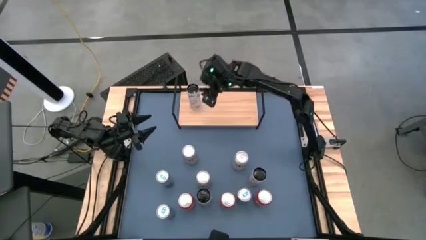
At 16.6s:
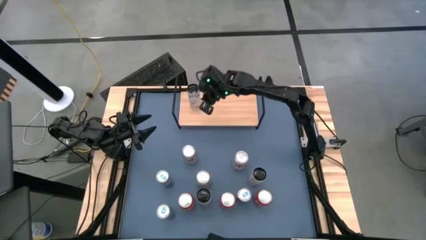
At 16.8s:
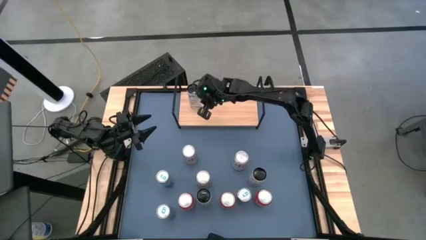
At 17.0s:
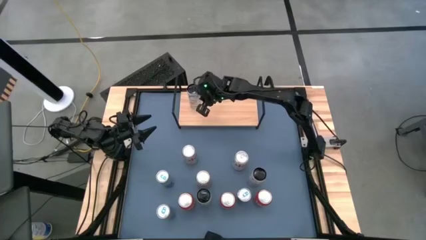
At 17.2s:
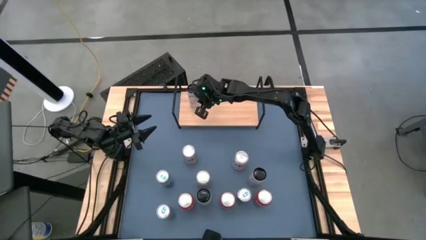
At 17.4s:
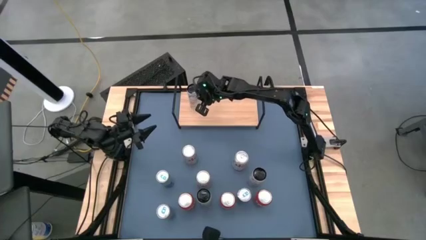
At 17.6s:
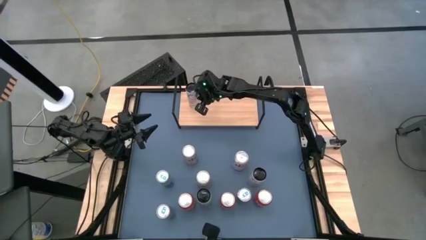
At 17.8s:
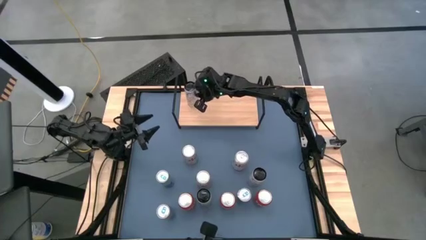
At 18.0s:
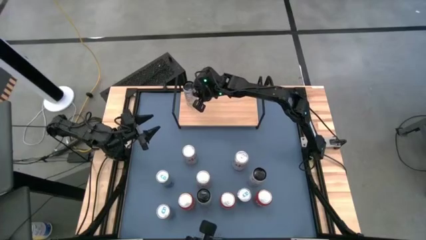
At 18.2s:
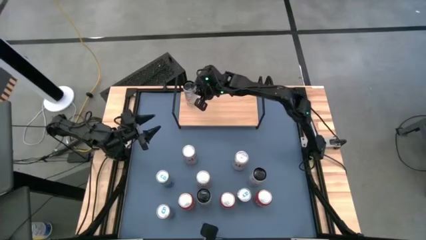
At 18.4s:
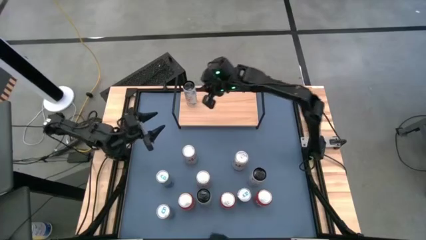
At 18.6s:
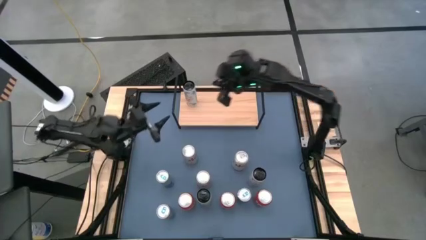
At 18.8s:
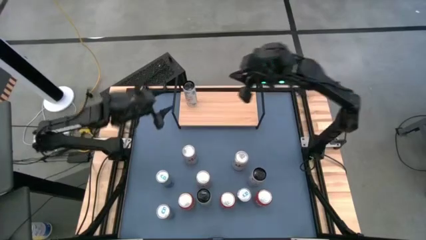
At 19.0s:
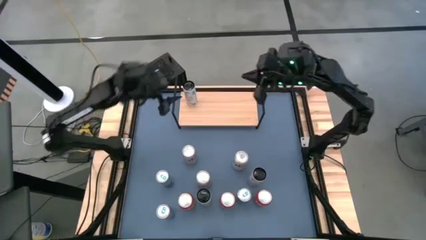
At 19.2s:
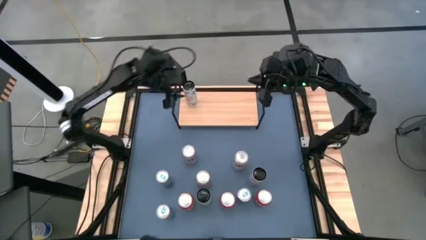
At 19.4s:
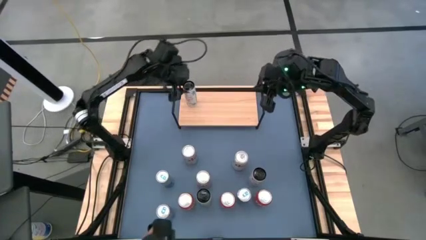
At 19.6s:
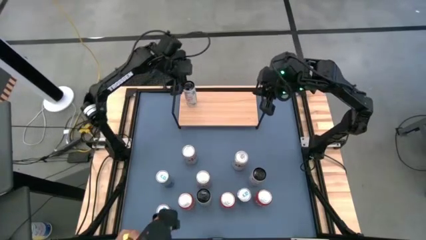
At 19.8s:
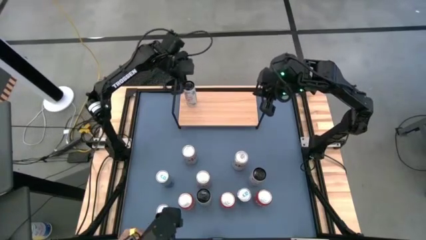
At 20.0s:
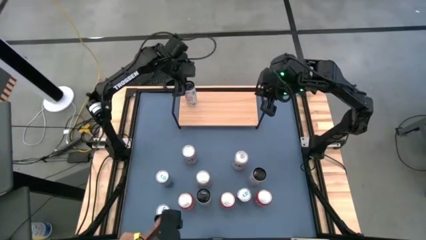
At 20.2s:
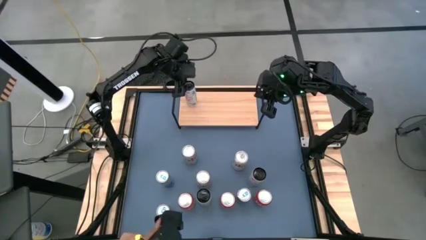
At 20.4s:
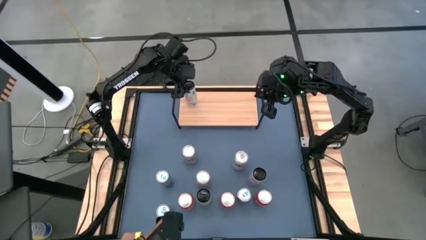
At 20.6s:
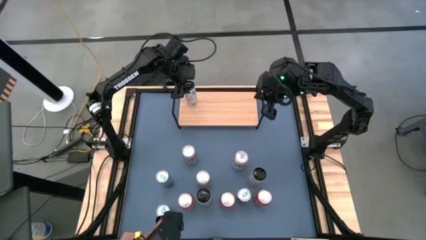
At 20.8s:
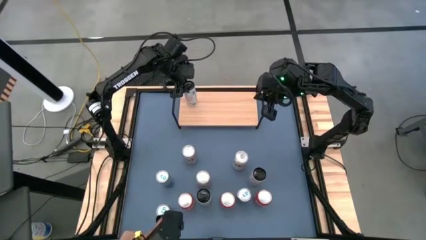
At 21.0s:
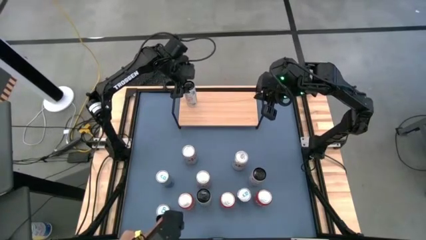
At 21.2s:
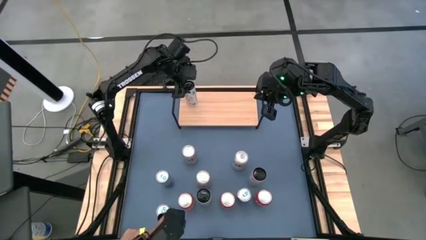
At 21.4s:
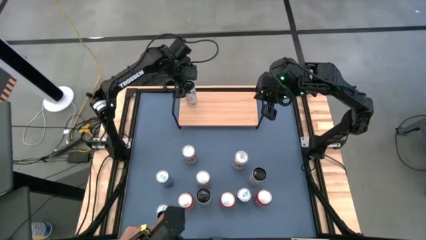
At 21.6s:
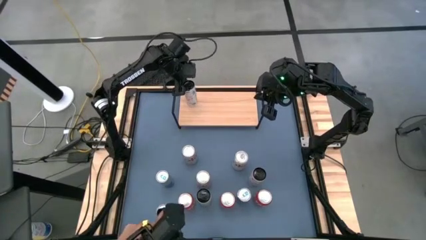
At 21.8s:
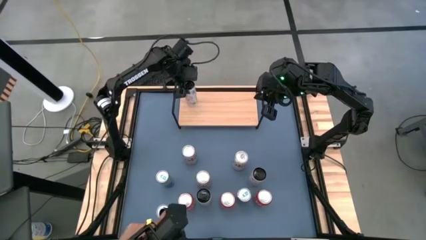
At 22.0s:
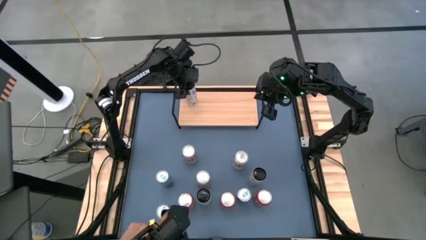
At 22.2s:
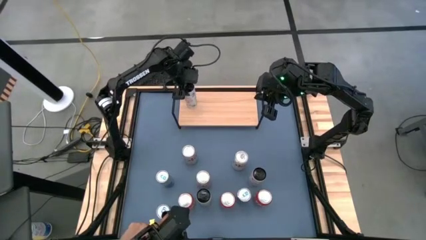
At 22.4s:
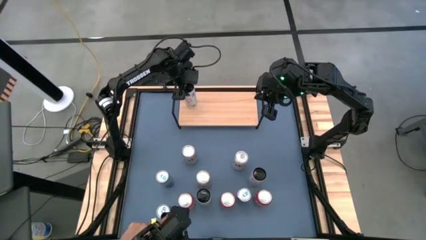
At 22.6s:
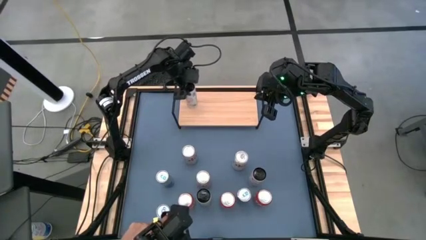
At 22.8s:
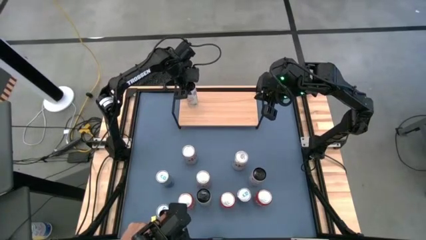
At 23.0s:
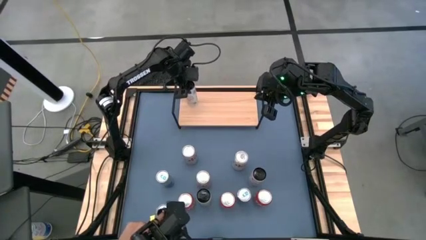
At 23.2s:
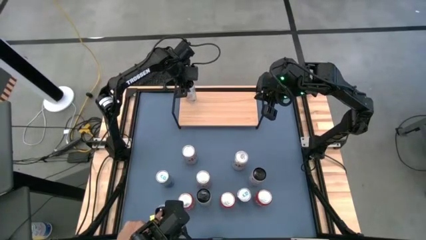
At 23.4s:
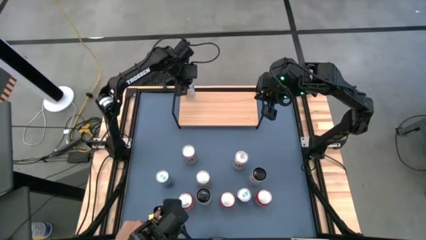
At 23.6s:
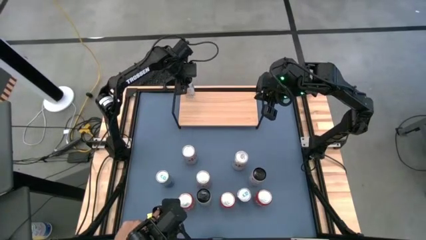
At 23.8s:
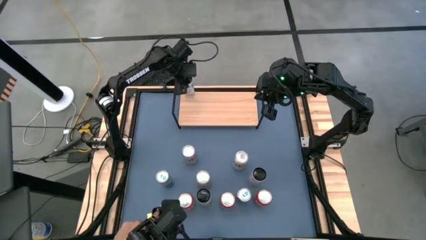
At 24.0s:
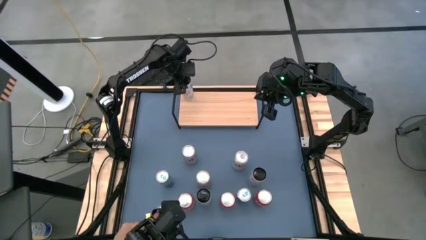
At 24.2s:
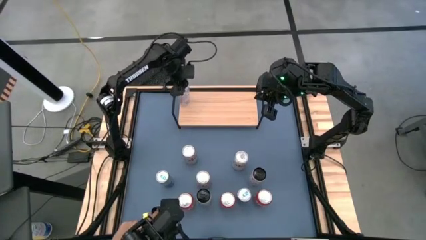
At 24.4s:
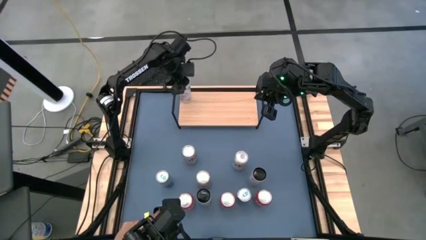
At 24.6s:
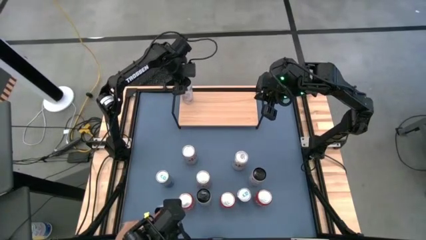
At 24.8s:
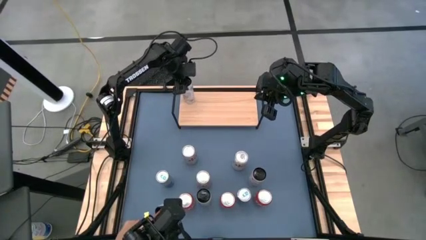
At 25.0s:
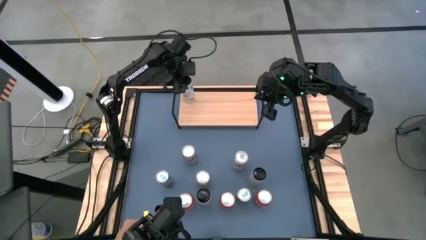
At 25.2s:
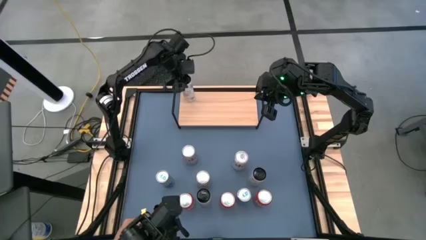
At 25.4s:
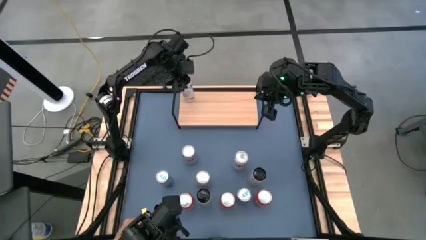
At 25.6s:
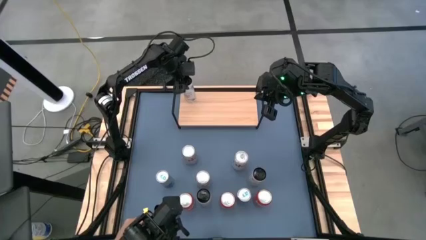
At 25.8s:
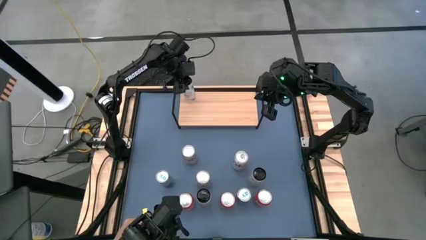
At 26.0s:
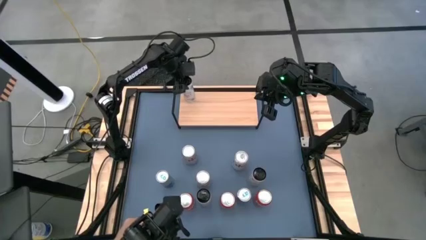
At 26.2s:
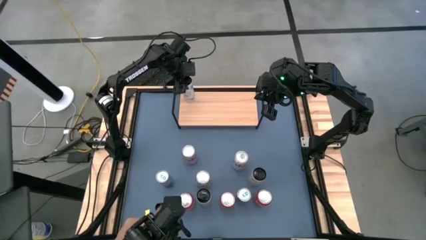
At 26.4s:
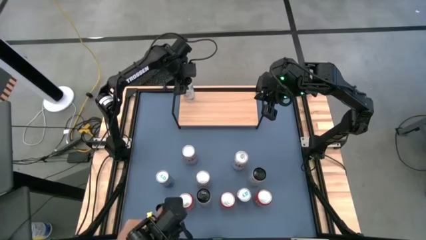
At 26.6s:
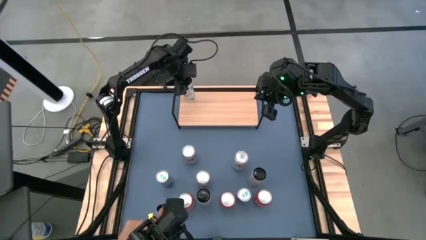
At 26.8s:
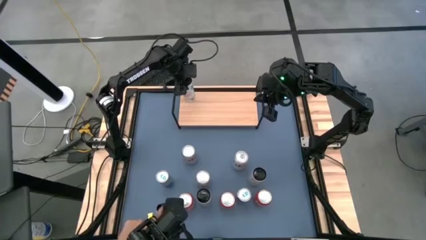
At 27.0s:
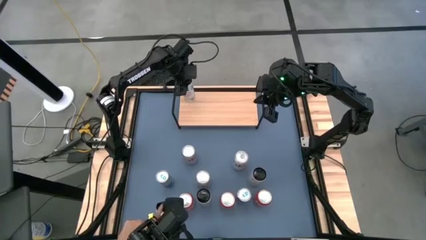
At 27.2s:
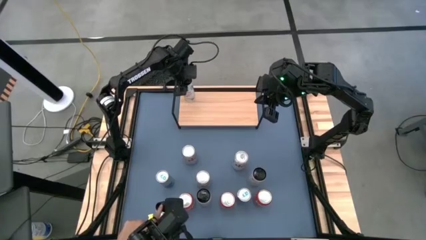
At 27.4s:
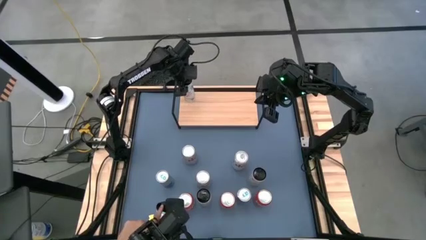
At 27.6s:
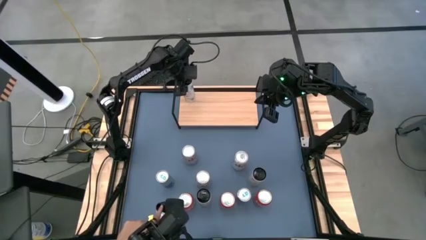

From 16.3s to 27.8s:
Task: Place canned beverage on shelf
Put the top white and pink soda can on the shelf

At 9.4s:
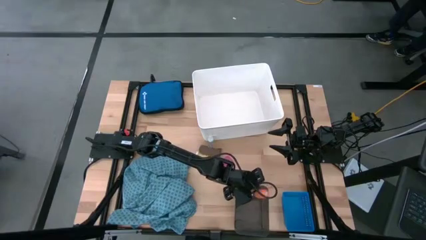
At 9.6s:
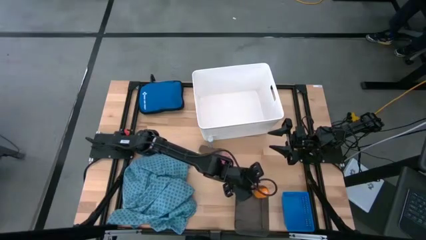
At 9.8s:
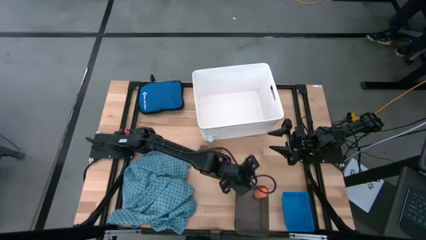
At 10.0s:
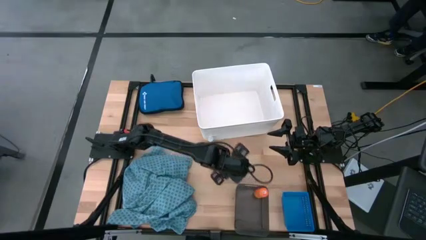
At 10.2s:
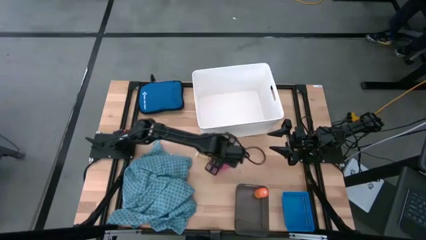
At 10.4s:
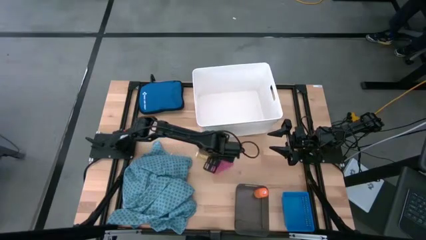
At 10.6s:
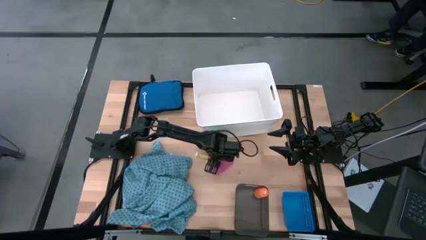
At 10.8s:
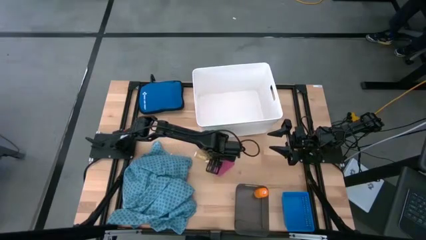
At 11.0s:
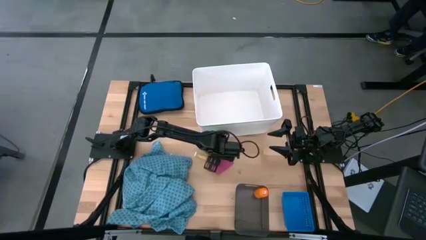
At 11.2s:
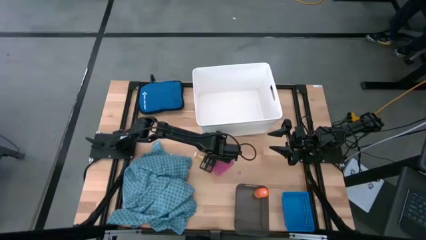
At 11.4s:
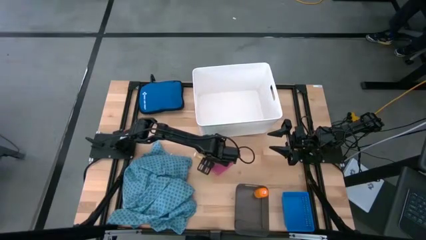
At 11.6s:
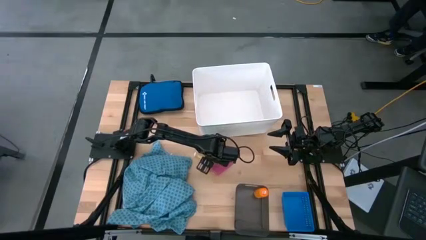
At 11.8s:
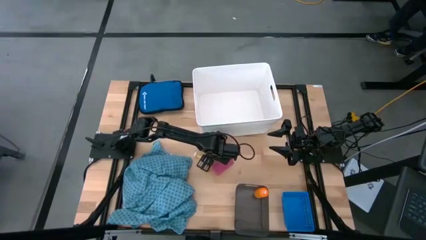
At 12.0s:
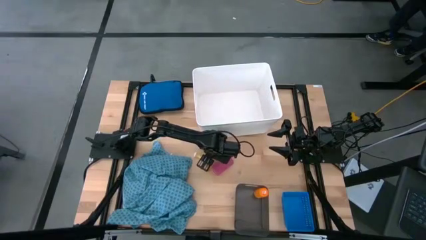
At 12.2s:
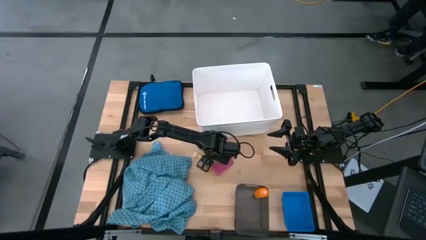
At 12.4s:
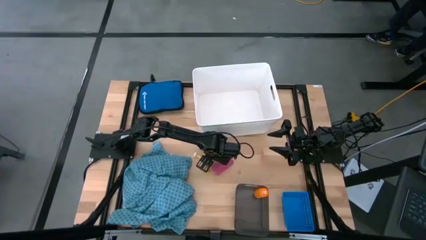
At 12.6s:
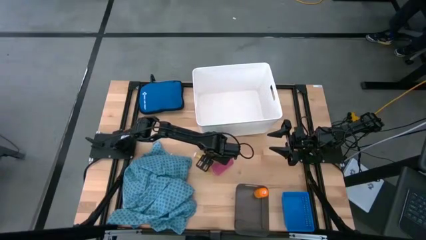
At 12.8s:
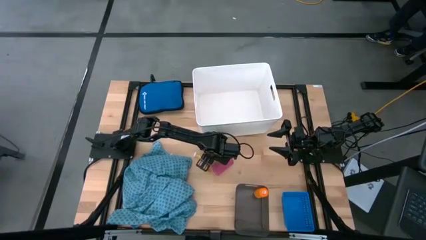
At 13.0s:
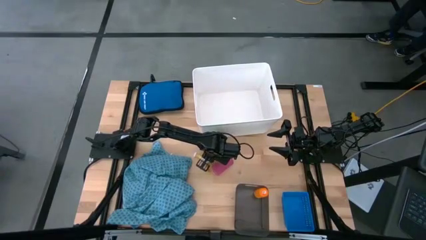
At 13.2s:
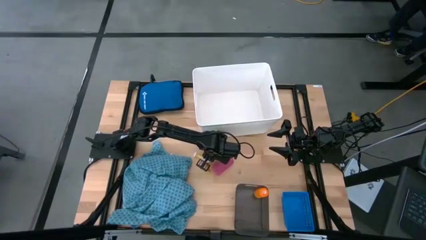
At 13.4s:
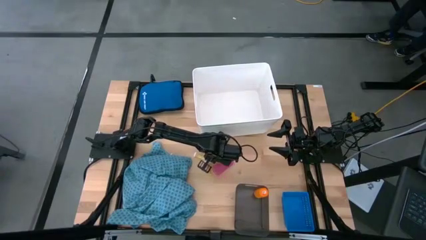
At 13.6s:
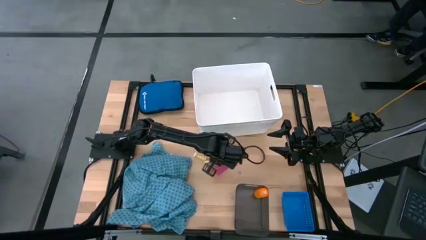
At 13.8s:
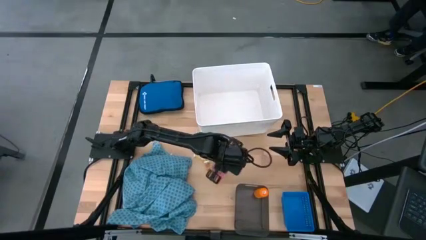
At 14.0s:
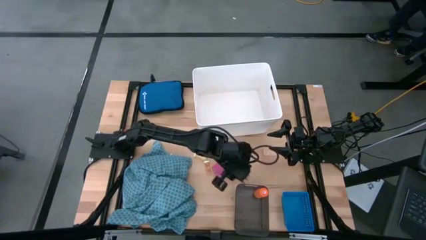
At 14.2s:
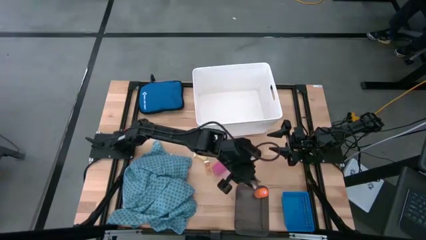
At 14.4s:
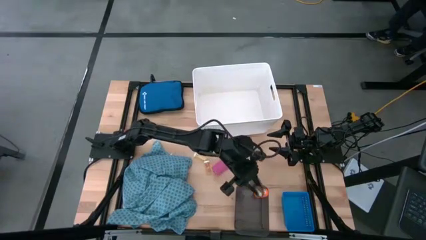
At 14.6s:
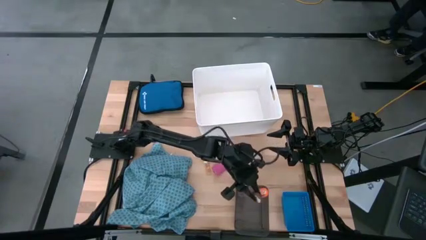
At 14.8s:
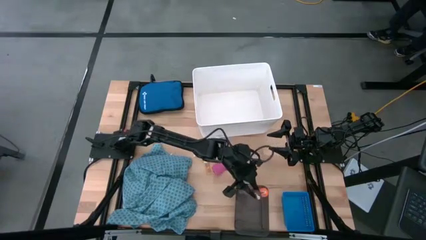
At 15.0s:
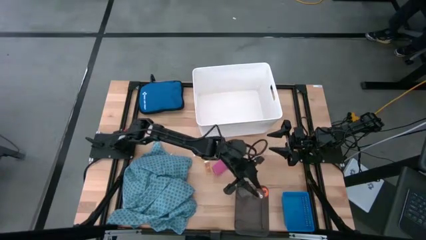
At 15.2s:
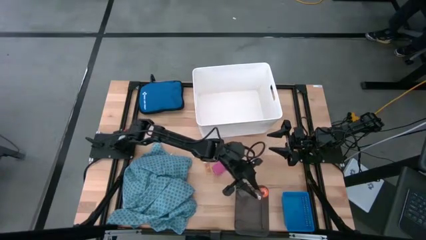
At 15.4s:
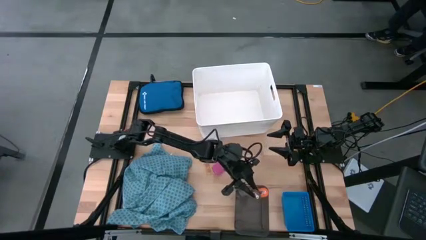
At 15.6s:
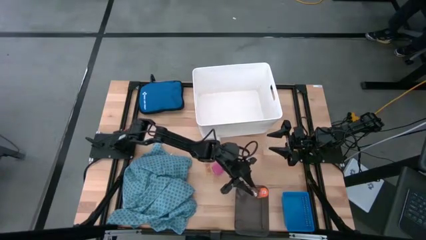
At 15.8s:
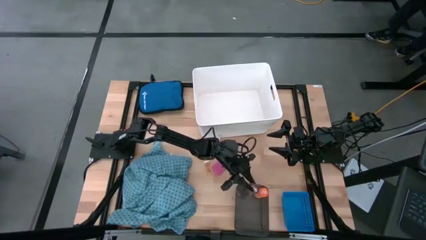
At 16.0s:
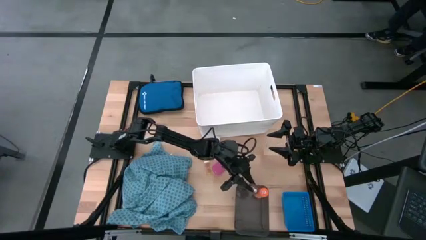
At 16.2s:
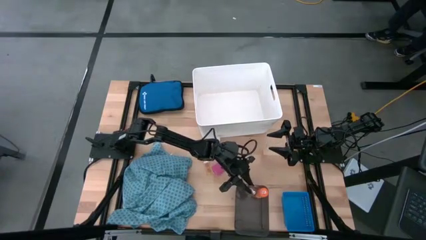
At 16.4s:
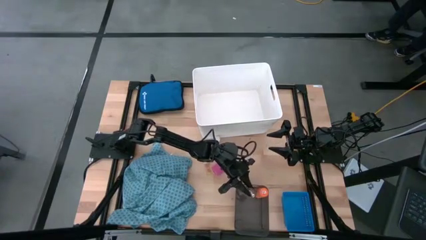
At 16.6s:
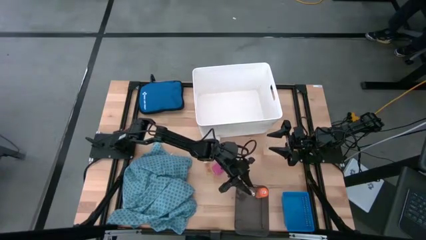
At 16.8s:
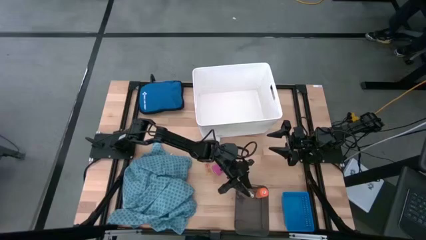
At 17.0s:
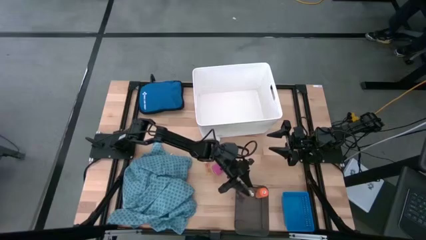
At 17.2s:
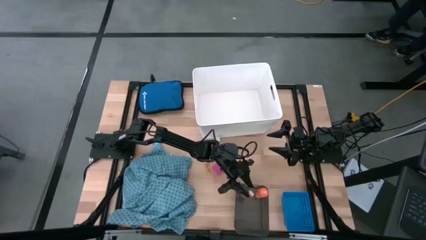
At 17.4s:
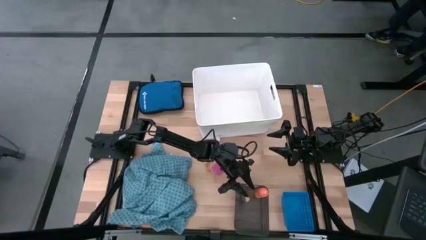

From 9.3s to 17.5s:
Task: Pick & place medical supplies in basket/bin
Put the brown bandage into the black bin
